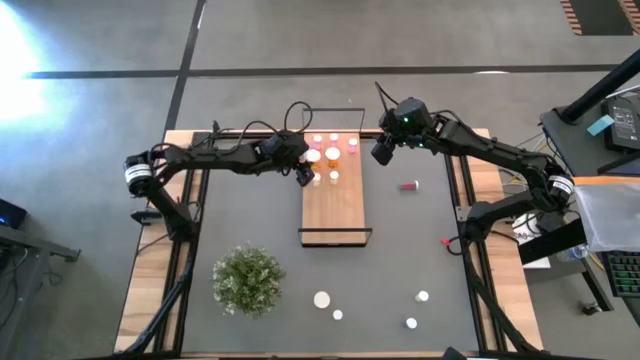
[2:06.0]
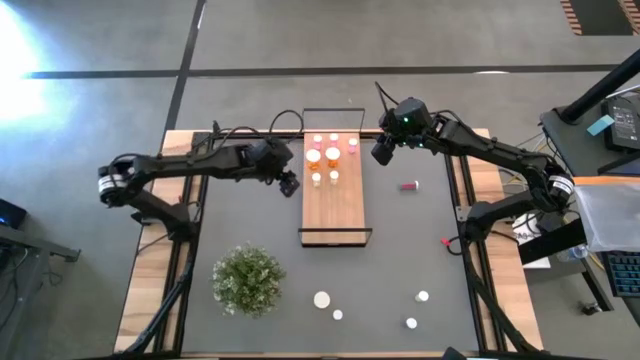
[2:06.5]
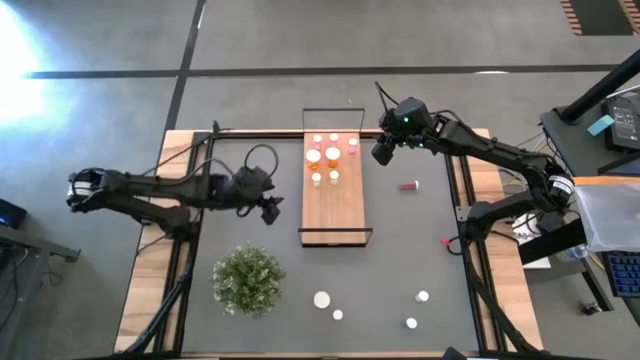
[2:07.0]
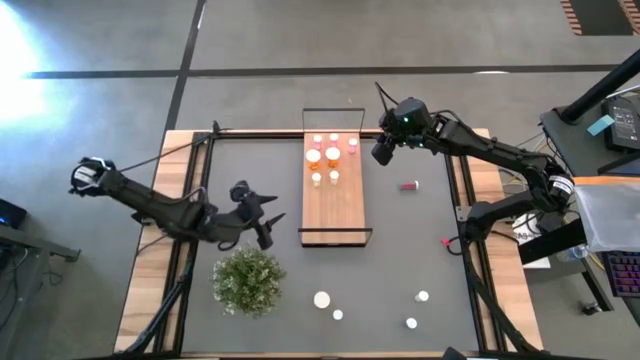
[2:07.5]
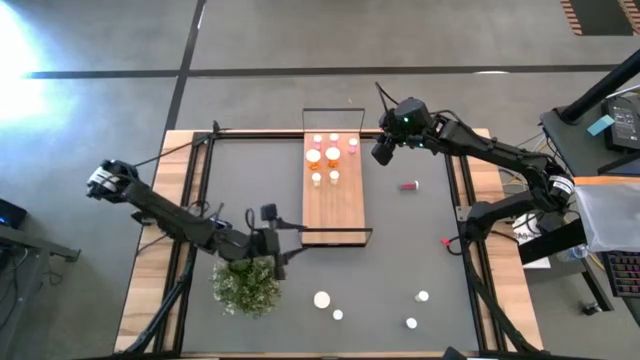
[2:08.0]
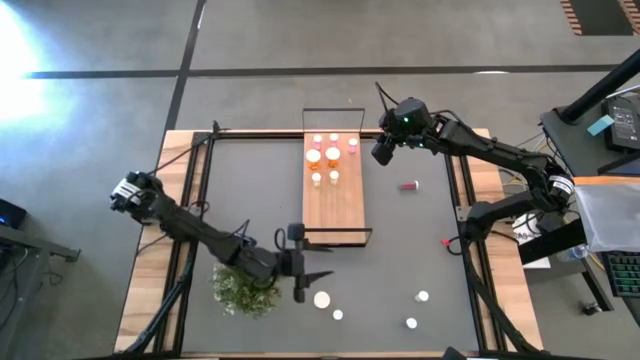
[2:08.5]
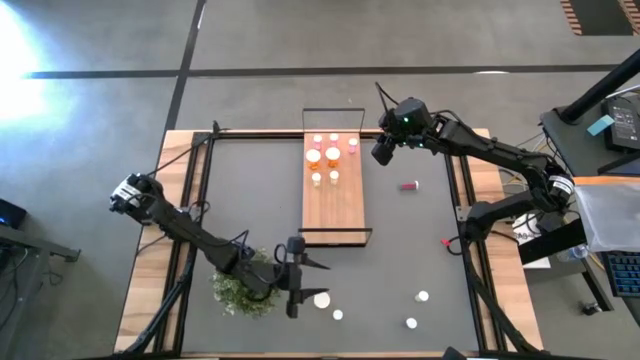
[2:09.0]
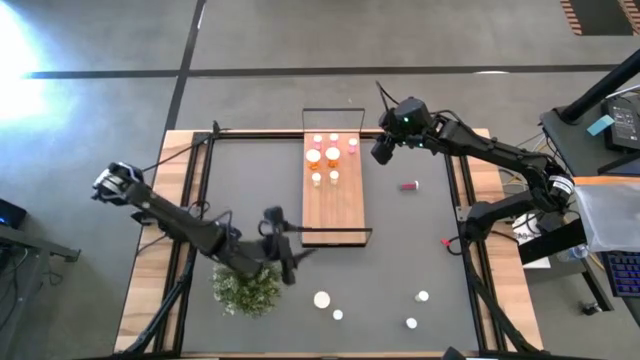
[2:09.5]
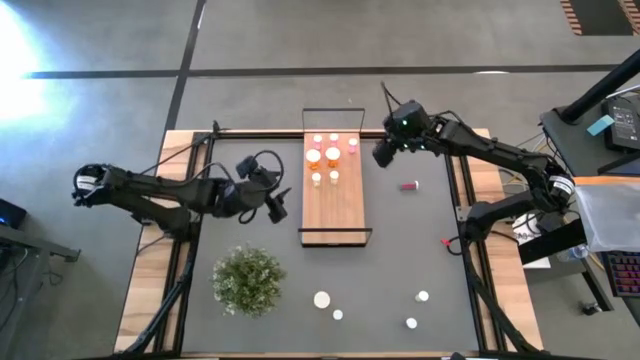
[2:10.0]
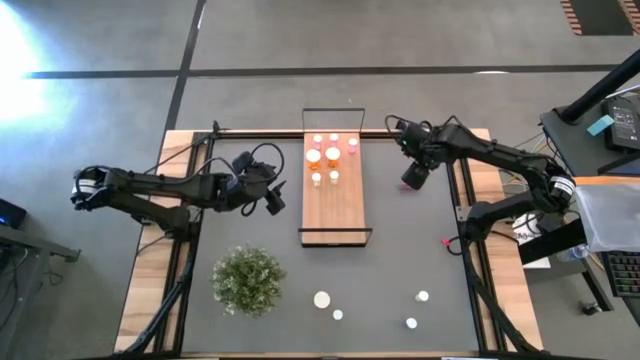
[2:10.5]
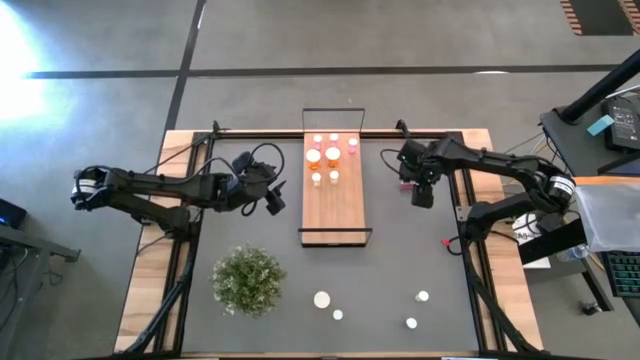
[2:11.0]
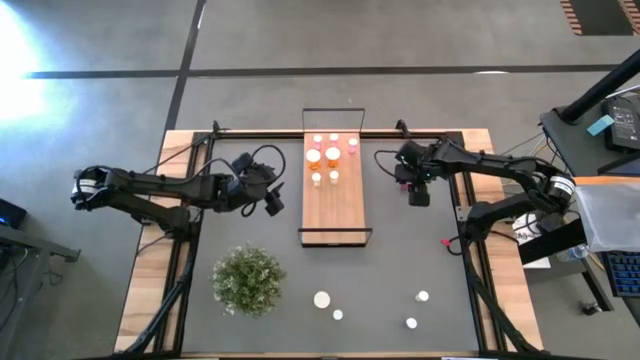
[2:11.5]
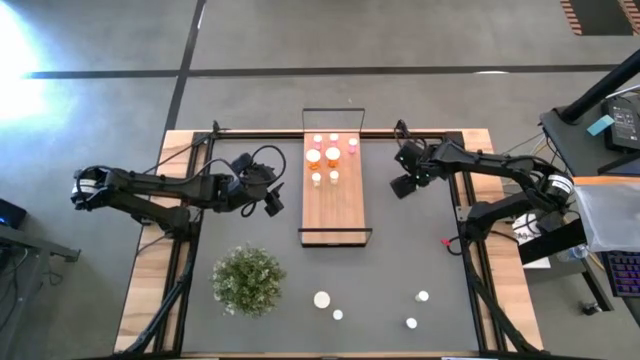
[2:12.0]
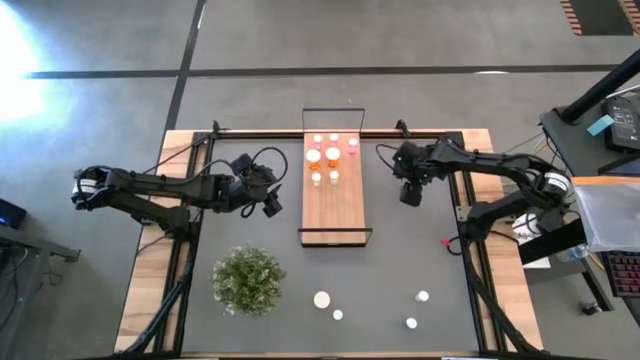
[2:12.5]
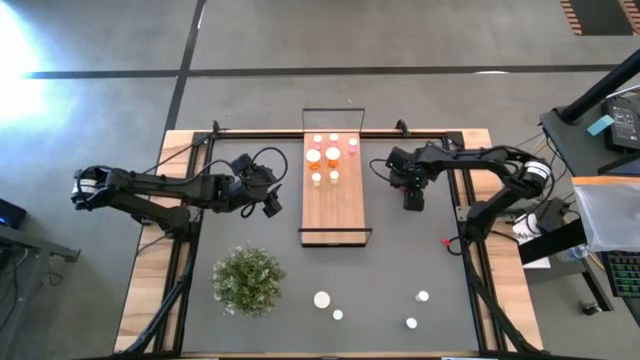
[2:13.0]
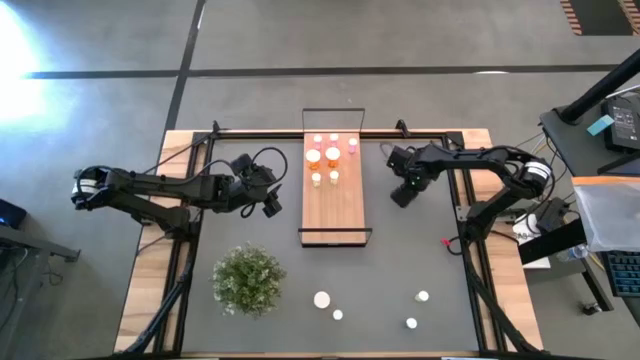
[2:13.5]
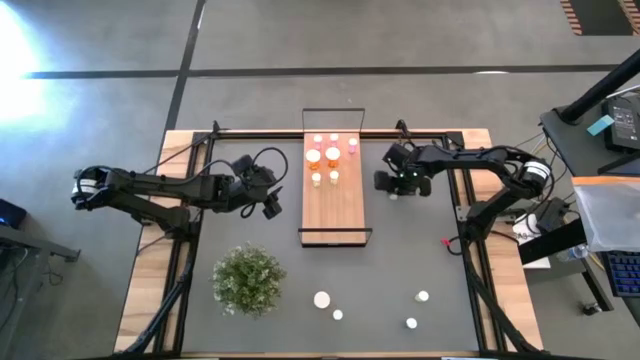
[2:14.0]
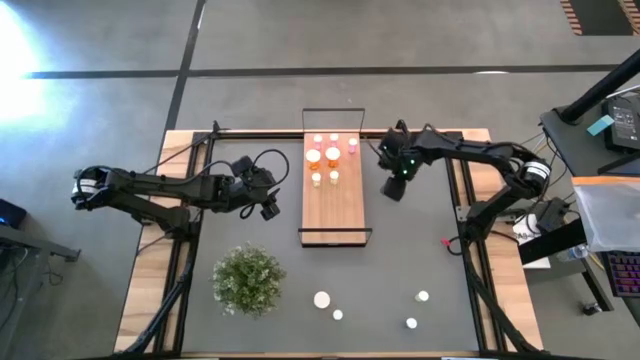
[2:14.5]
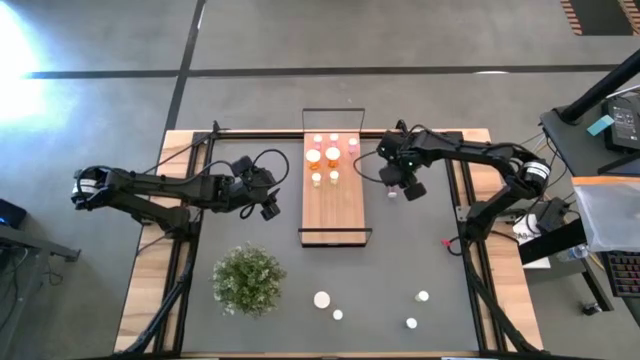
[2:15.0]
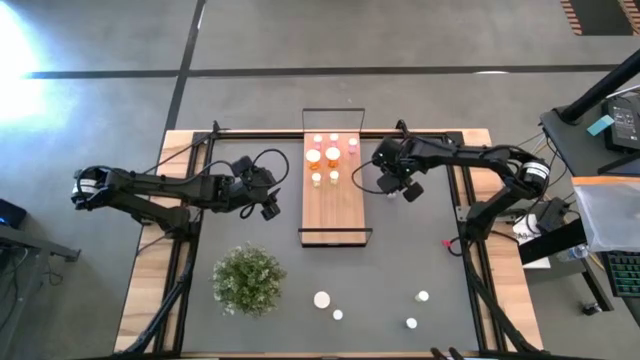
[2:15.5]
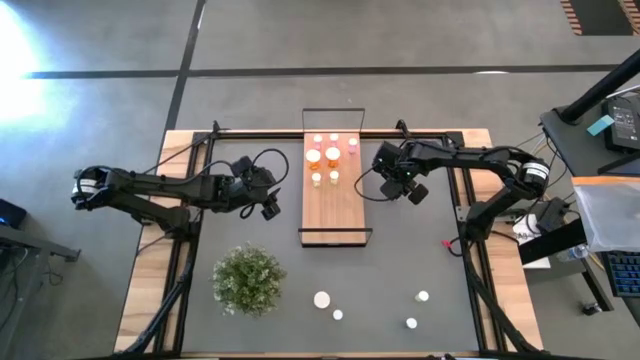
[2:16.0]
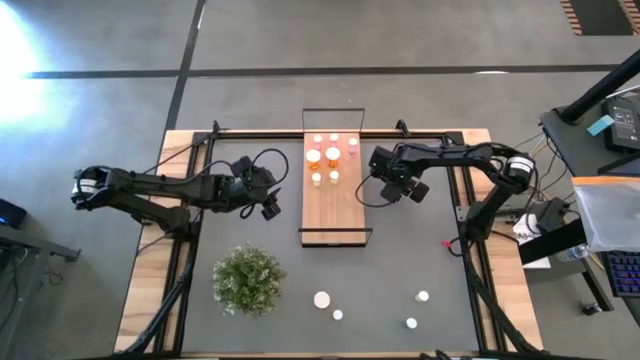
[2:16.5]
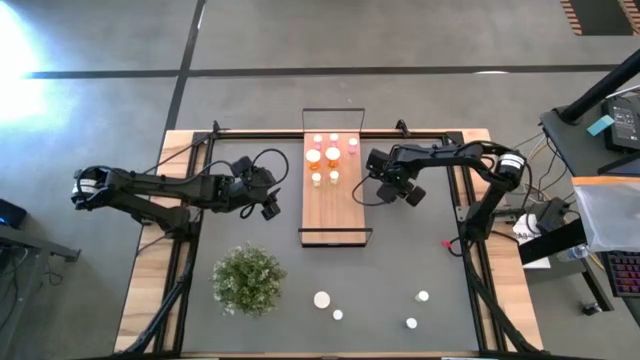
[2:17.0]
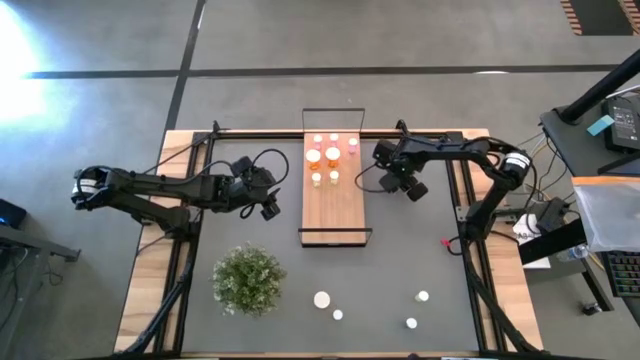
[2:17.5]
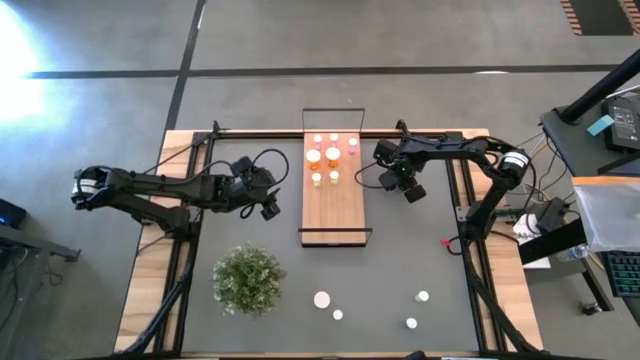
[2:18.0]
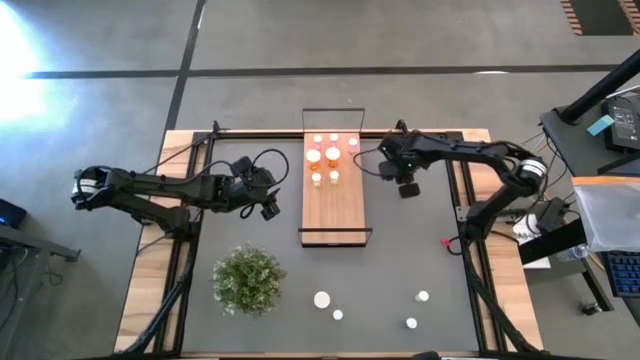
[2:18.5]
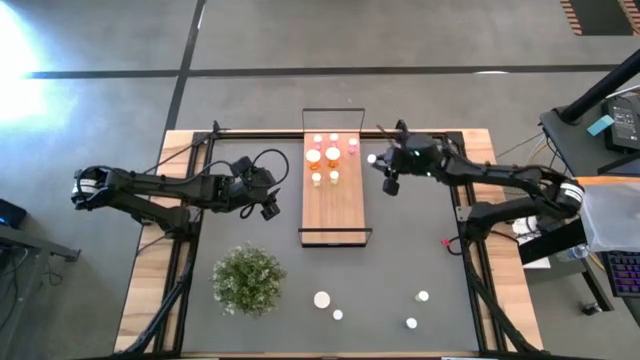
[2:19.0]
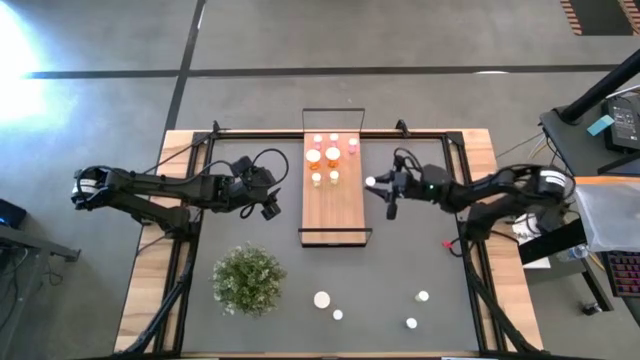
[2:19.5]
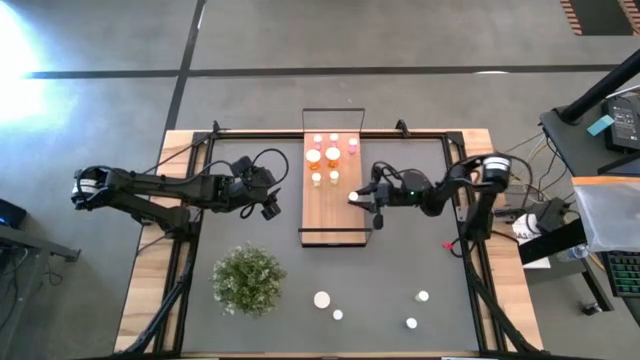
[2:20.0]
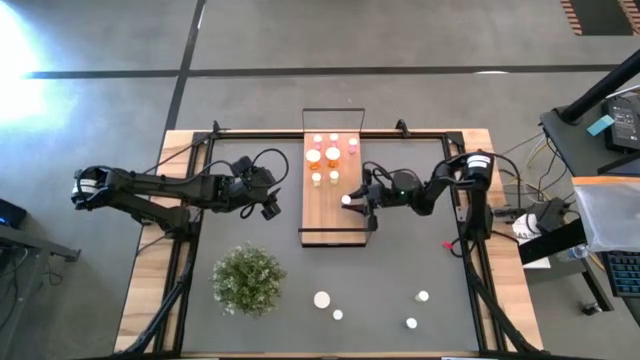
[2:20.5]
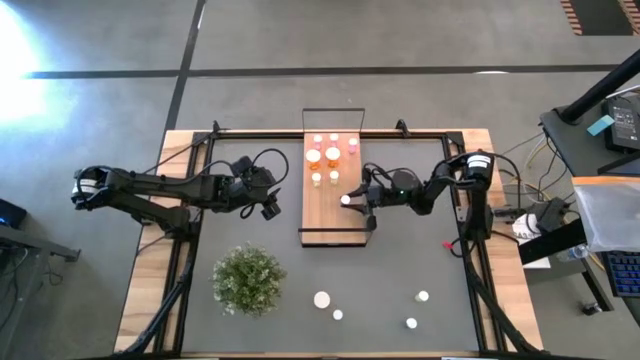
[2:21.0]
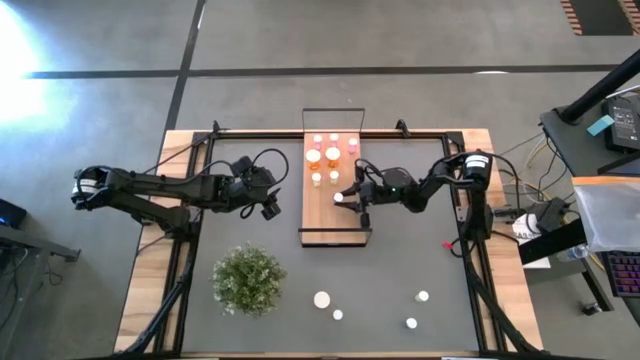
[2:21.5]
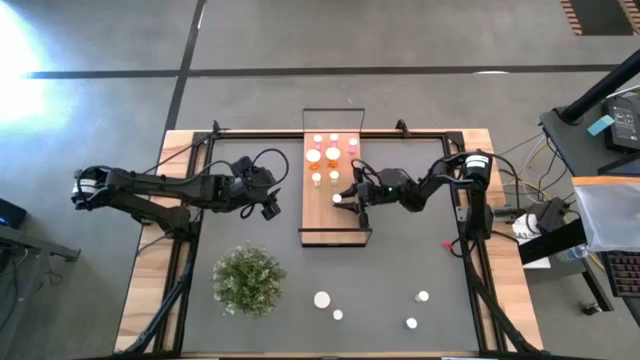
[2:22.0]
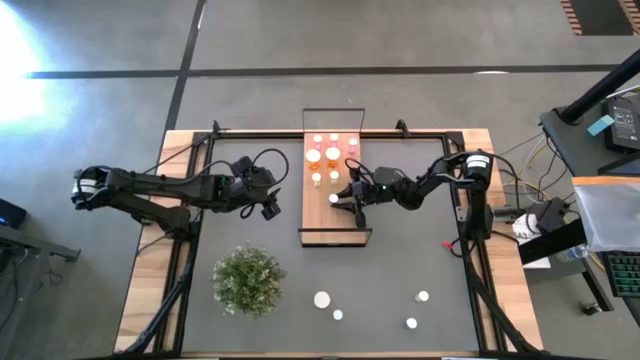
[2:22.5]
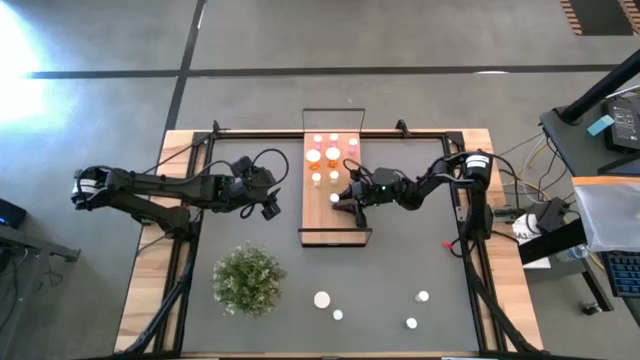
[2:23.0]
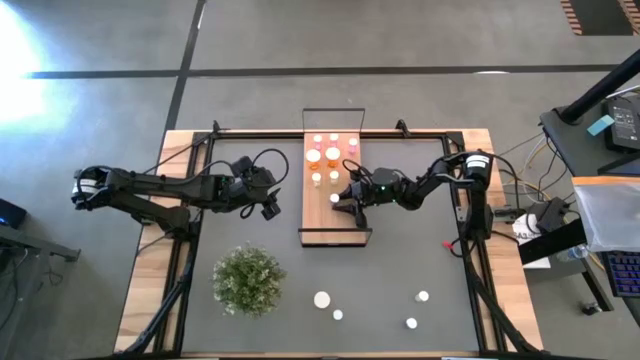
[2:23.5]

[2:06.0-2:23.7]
Task: Pick and place medicine bottles onto shelf by color
Put the top right blue pill bottle on the shelf

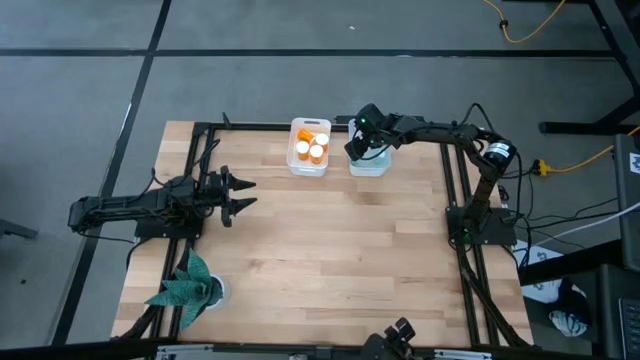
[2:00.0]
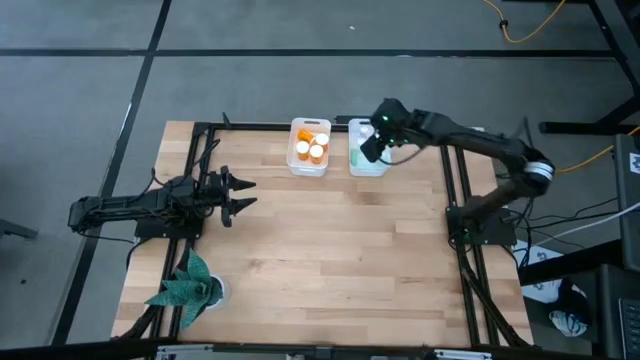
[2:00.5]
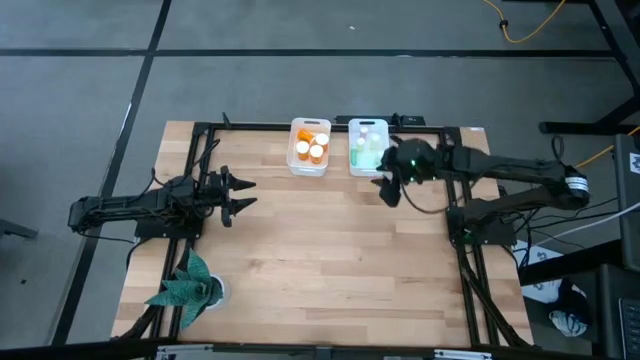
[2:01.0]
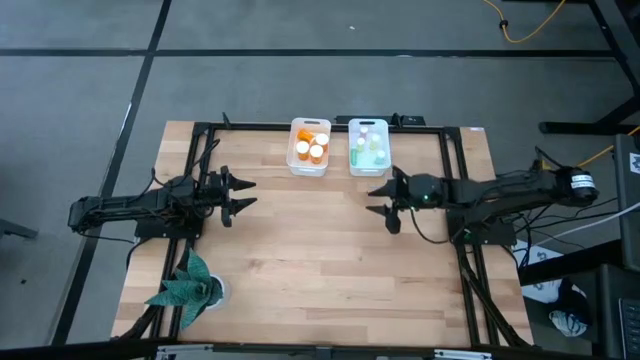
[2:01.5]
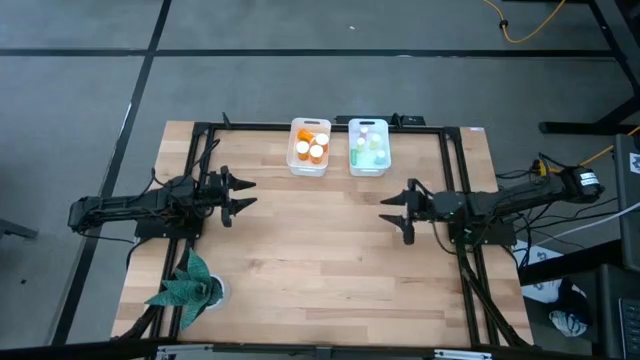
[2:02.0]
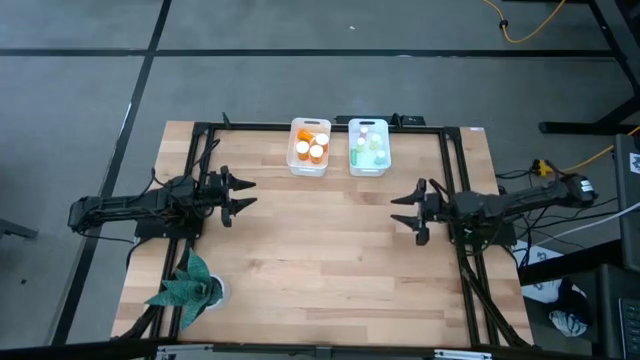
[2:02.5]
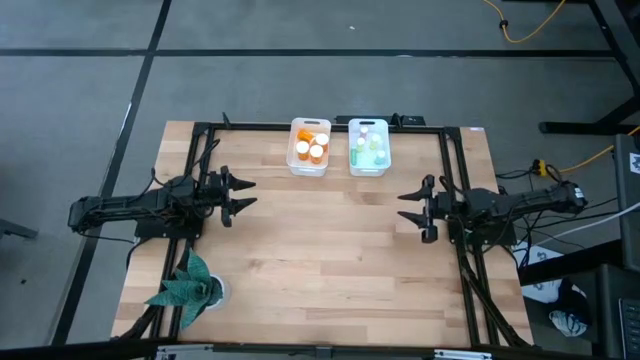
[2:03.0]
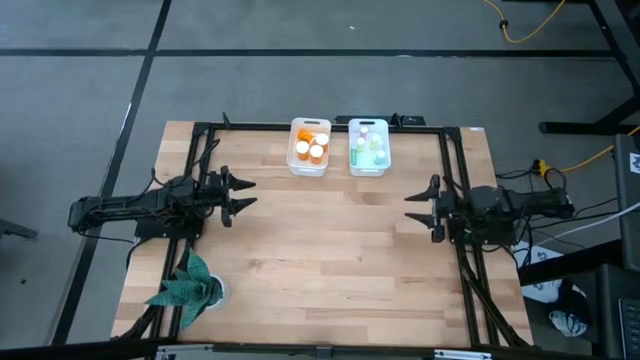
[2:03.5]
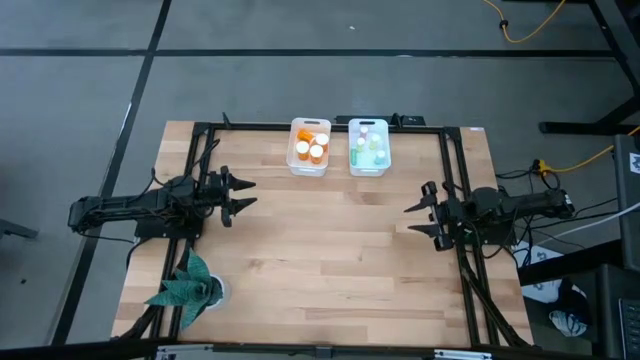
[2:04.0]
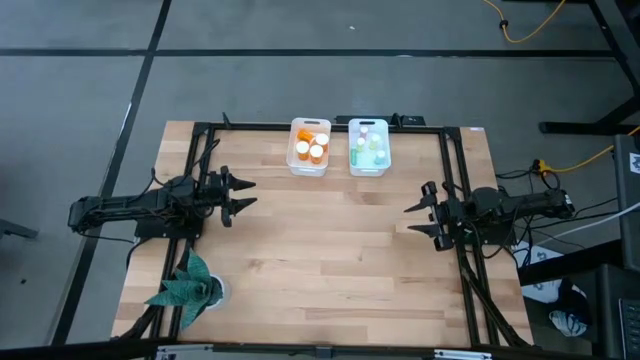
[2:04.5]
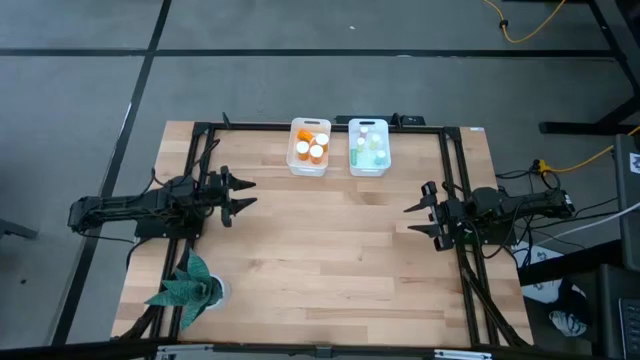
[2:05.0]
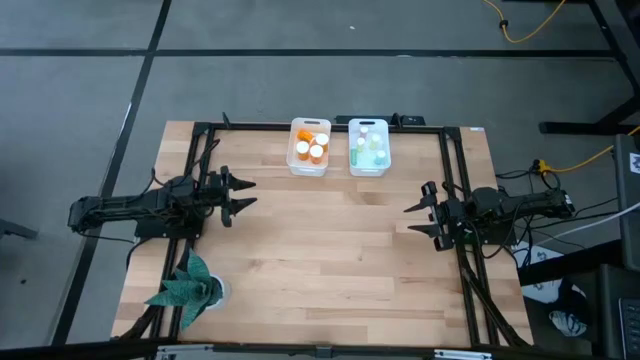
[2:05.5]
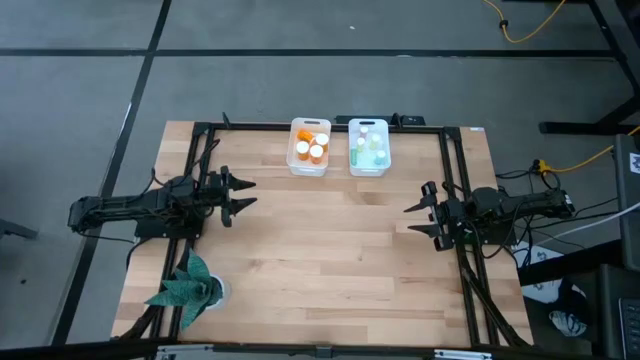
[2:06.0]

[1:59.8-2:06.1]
Task: Pick and place medicine bottles into bin by pill shape (circle, oval)
Return to Home Position
